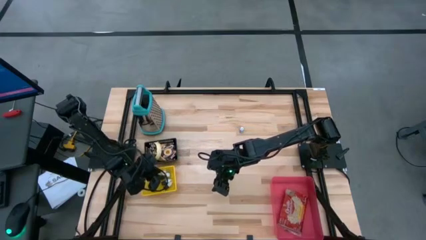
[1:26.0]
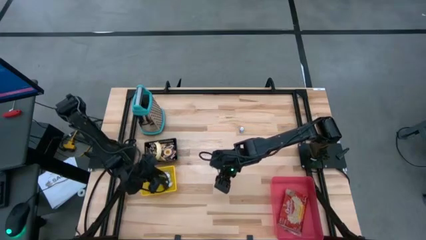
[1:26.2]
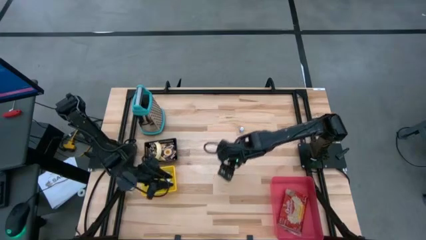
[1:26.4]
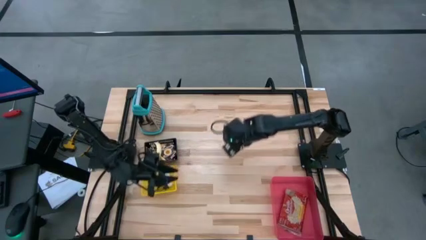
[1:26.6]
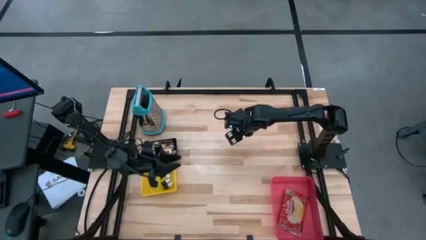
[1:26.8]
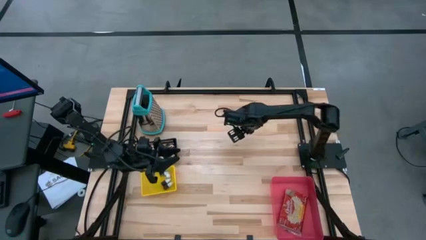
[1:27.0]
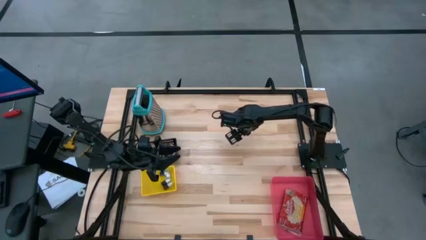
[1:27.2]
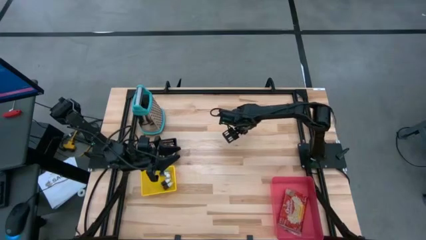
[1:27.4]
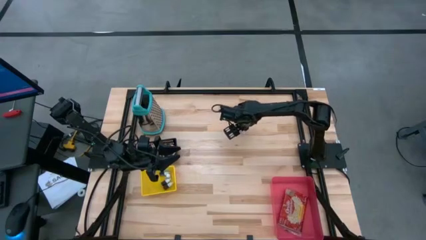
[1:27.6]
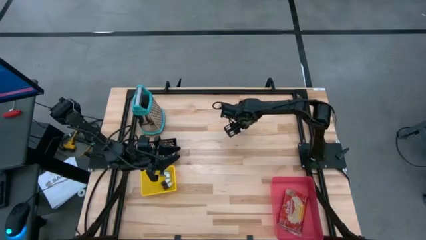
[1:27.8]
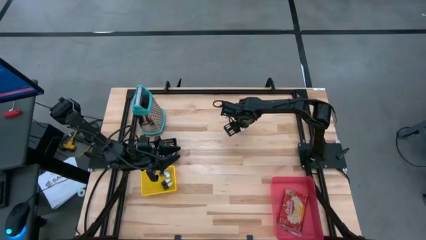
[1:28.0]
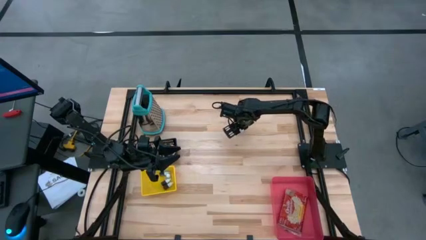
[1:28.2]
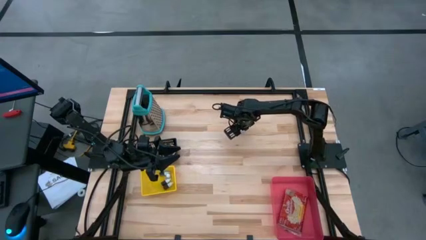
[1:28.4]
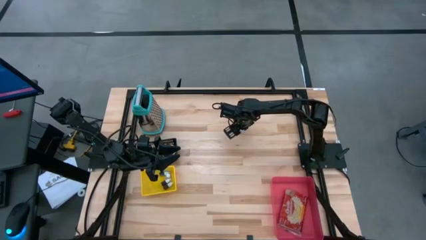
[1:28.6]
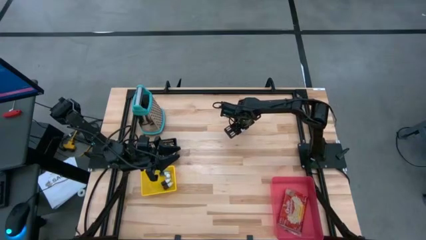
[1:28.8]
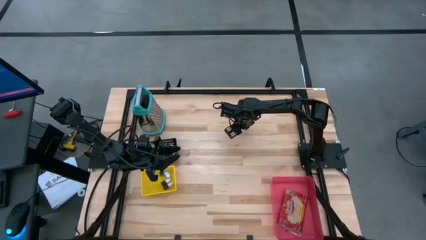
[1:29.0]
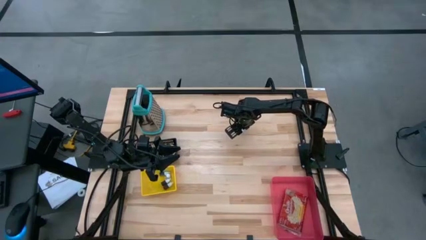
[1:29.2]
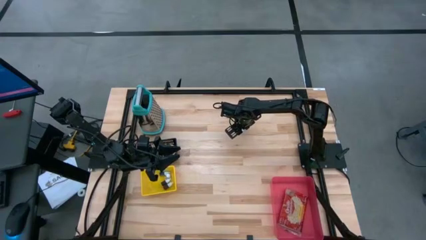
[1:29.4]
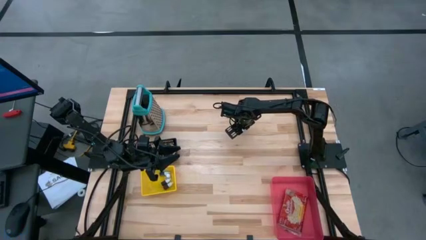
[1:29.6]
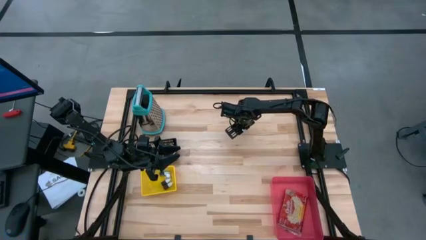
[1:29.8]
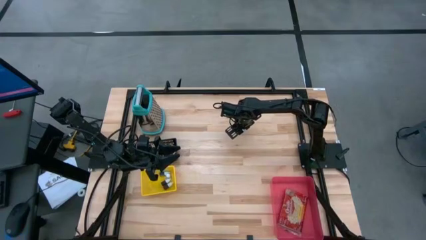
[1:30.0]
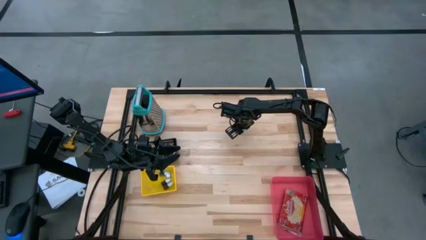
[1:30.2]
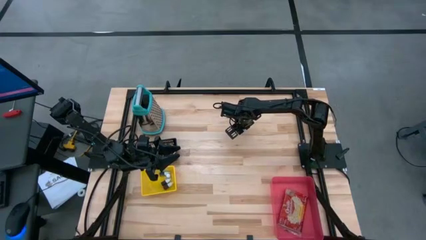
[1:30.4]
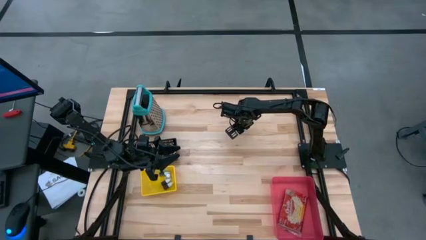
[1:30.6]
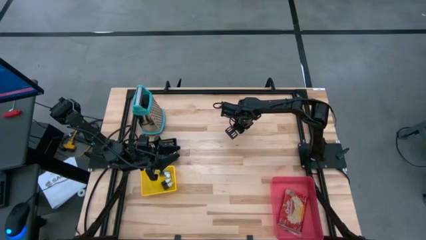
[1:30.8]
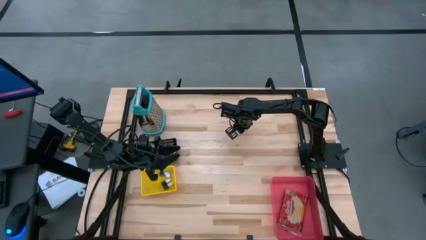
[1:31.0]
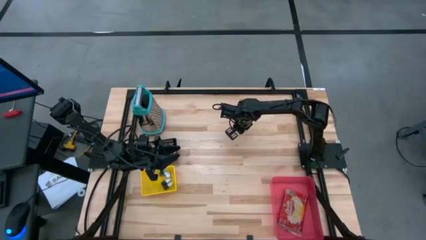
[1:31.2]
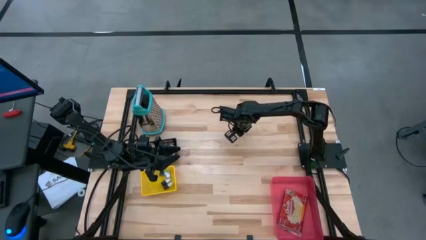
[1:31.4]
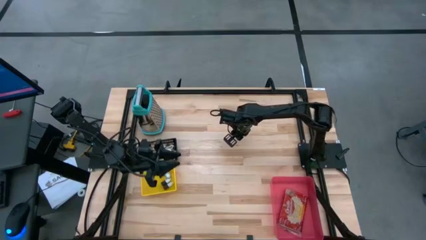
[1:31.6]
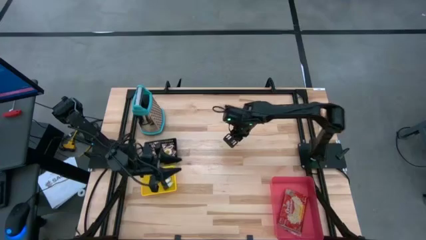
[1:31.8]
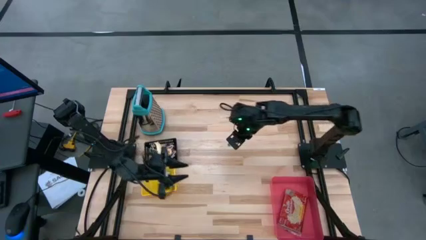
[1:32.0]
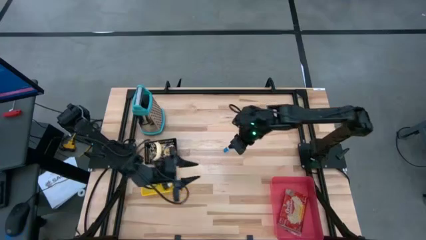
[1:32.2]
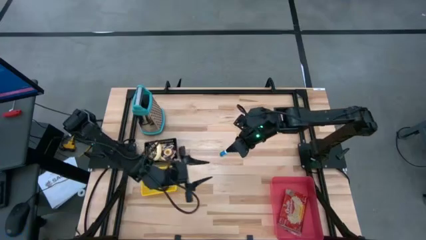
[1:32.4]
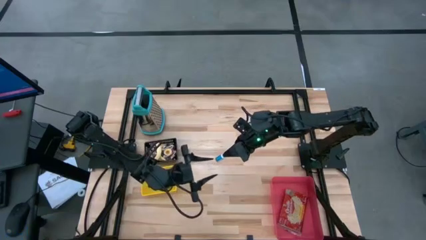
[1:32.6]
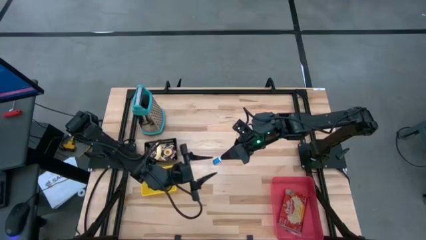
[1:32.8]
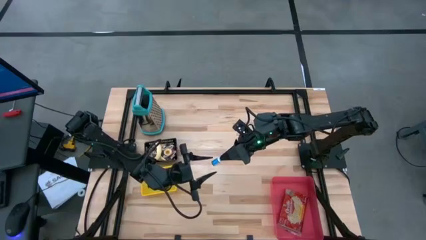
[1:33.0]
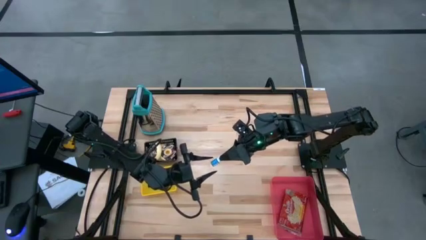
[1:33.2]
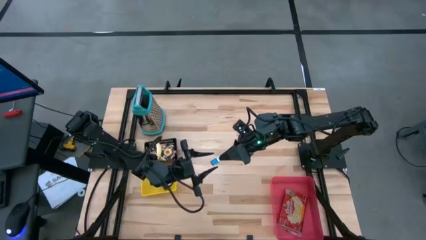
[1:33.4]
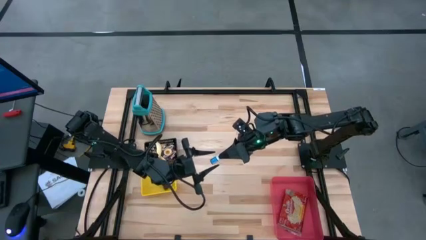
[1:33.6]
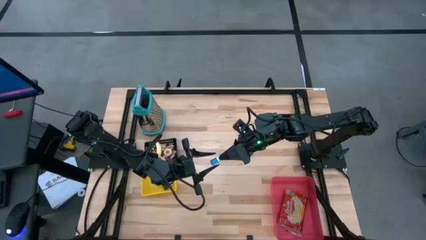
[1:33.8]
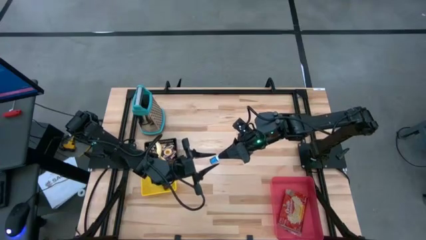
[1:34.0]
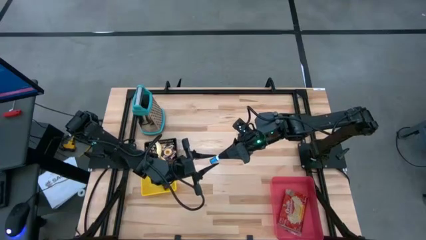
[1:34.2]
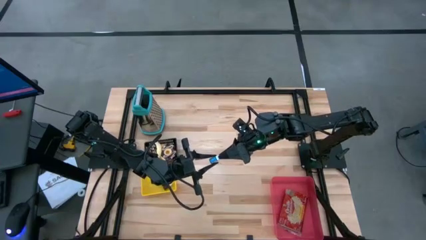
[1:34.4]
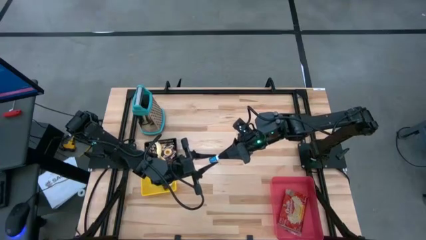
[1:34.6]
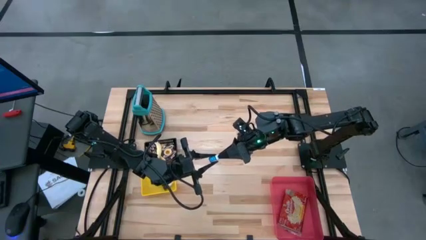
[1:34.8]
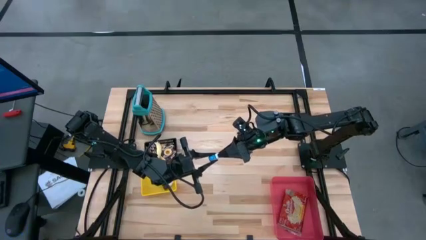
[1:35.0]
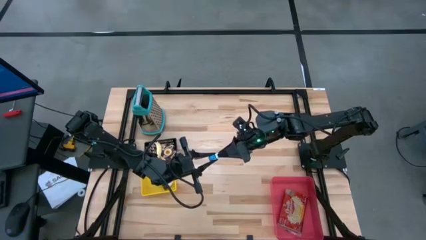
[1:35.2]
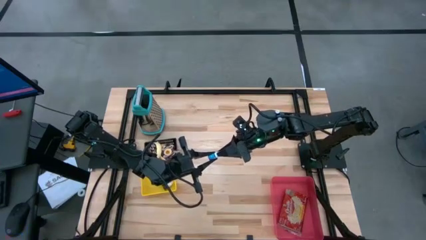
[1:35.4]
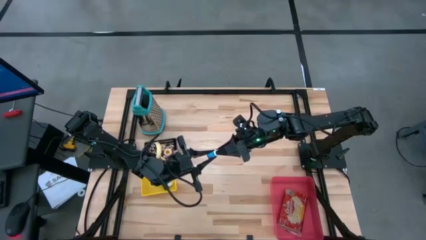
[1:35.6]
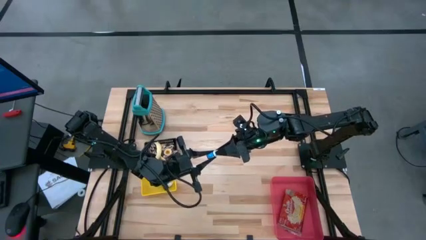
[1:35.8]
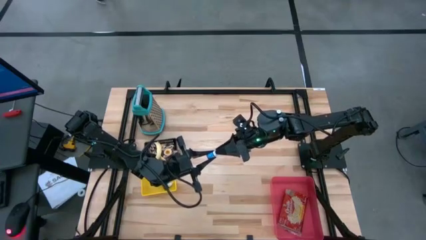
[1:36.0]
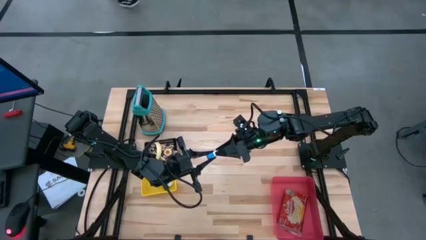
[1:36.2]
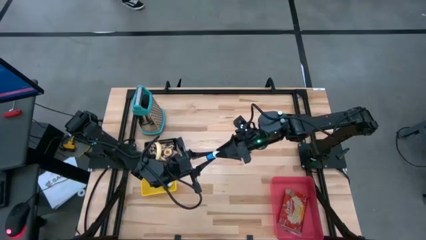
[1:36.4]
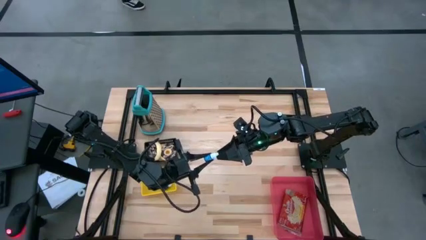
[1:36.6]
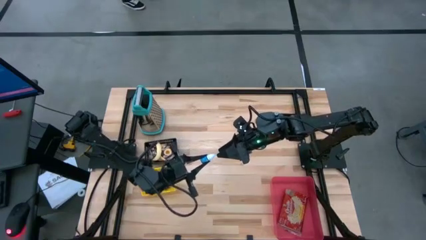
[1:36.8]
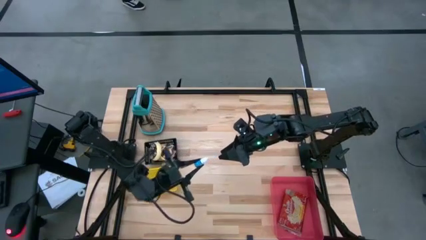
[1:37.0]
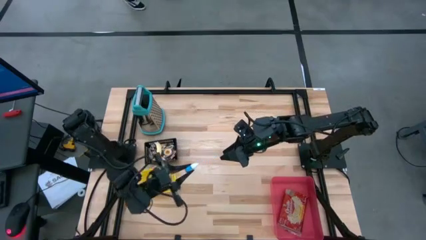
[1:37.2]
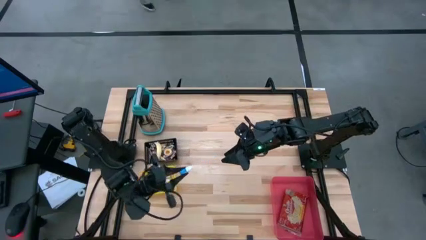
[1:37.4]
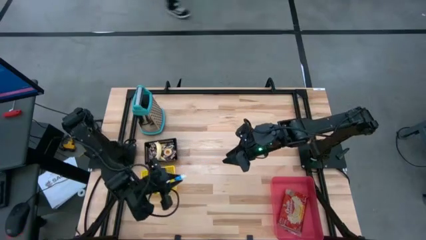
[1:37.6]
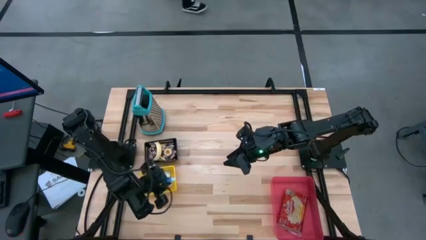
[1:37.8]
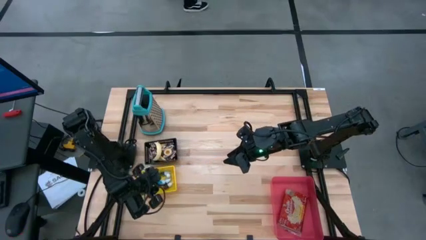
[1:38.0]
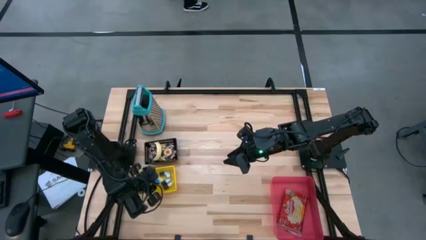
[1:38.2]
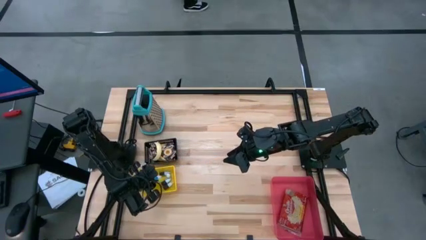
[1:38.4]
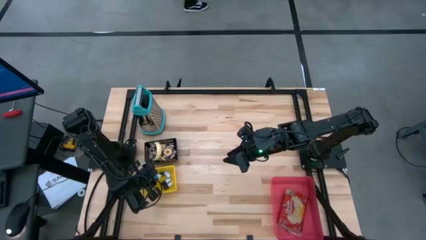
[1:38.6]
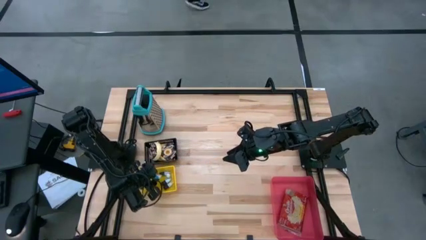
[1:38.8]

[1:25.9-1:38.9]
Put the blue food coloring bottle into the yellow bin
